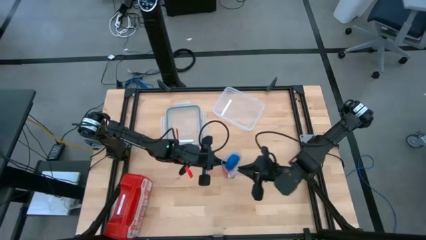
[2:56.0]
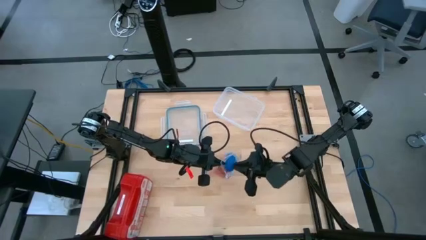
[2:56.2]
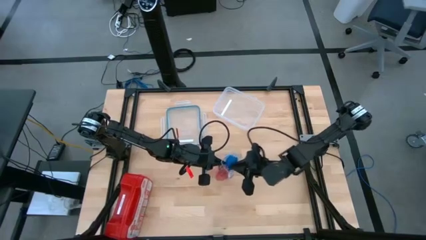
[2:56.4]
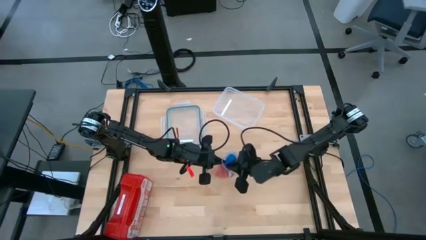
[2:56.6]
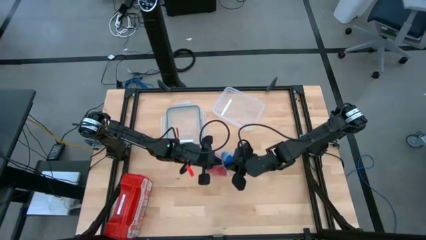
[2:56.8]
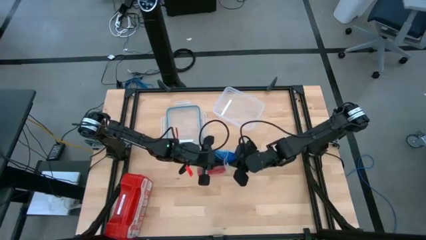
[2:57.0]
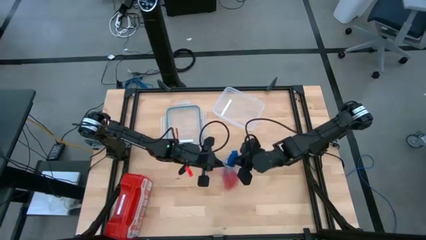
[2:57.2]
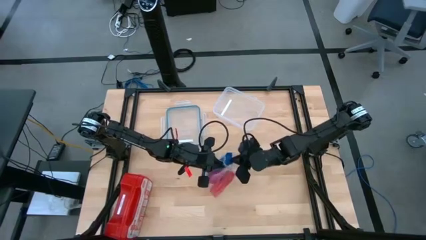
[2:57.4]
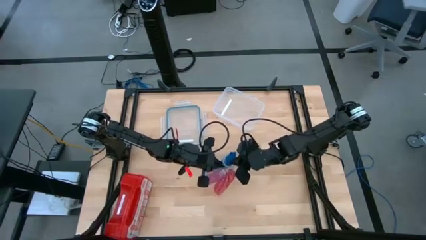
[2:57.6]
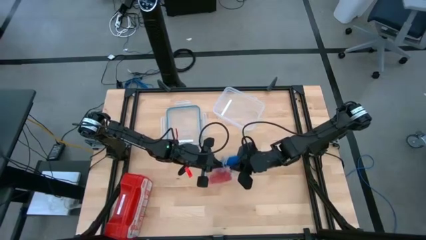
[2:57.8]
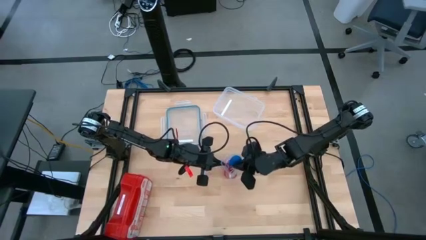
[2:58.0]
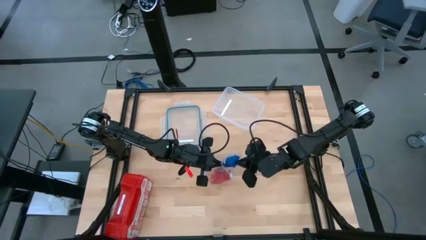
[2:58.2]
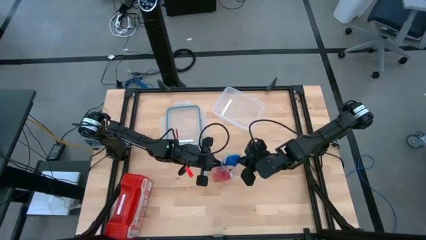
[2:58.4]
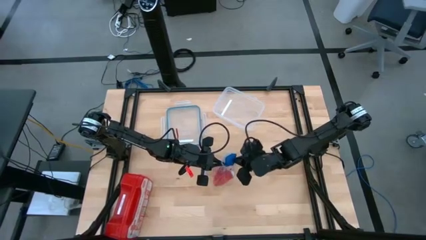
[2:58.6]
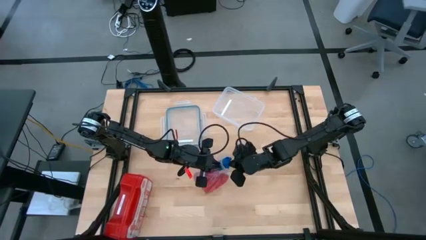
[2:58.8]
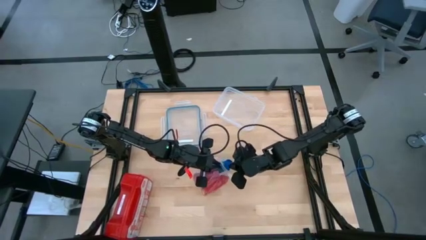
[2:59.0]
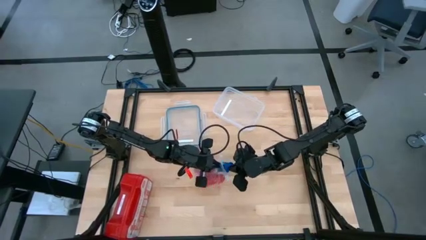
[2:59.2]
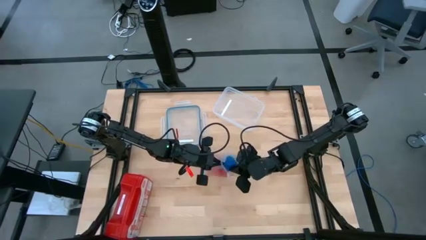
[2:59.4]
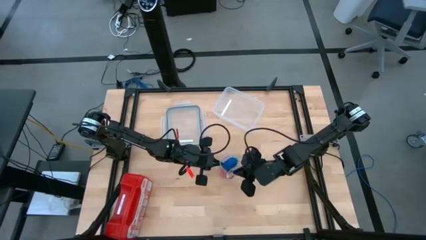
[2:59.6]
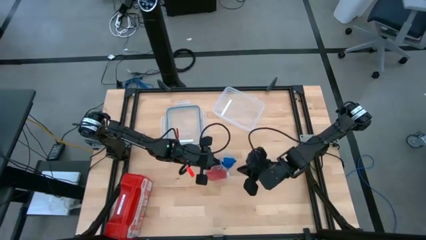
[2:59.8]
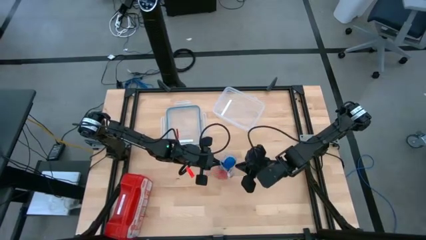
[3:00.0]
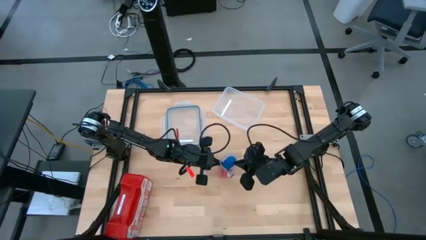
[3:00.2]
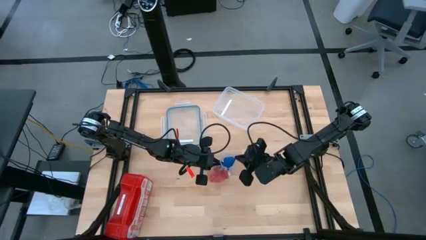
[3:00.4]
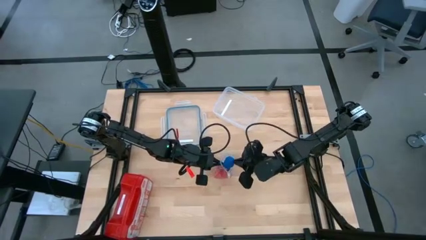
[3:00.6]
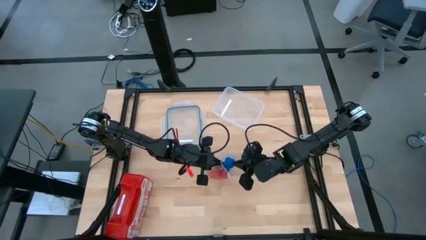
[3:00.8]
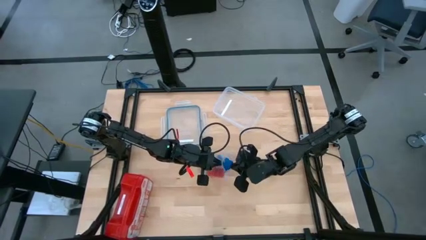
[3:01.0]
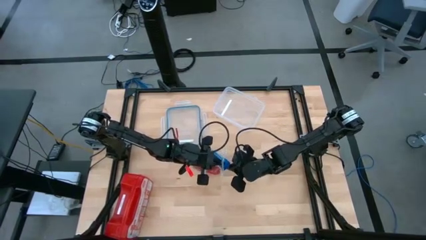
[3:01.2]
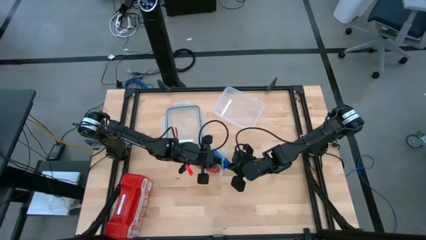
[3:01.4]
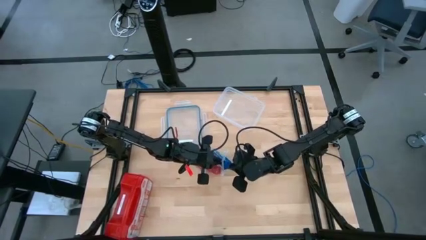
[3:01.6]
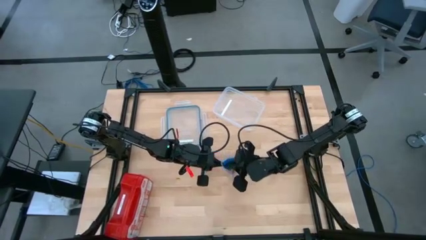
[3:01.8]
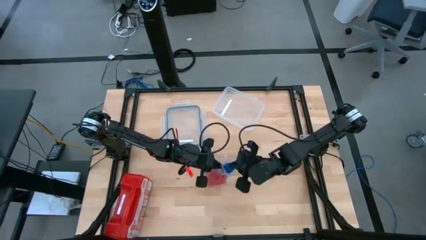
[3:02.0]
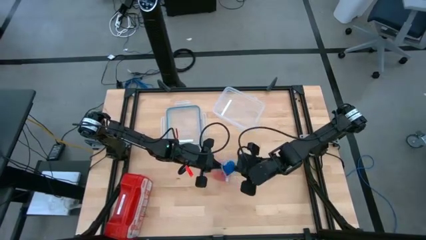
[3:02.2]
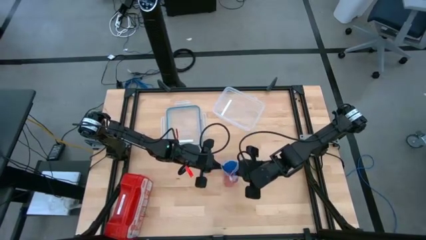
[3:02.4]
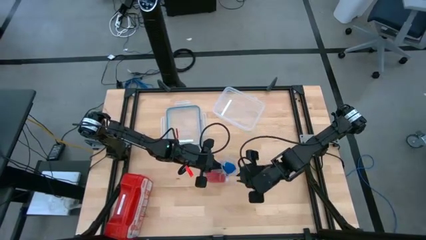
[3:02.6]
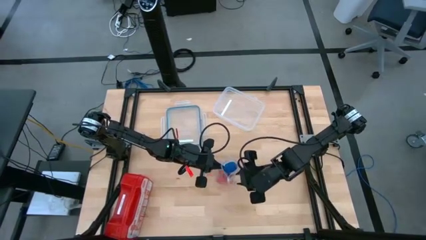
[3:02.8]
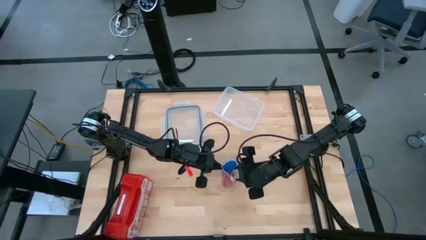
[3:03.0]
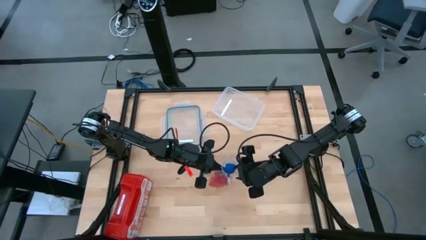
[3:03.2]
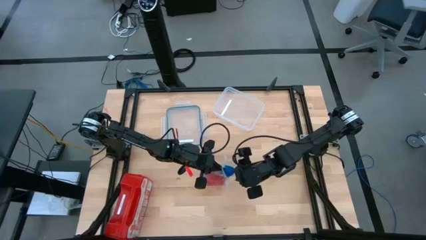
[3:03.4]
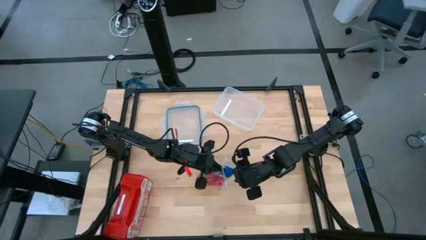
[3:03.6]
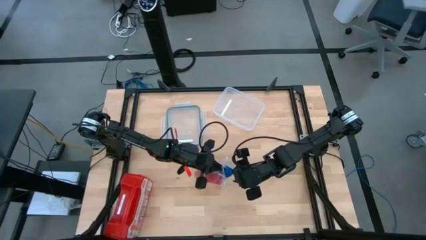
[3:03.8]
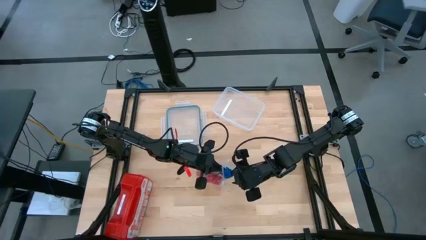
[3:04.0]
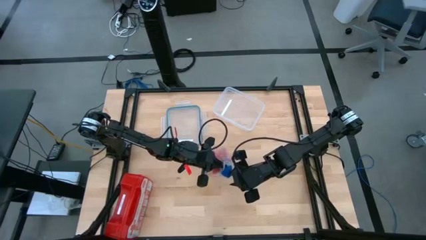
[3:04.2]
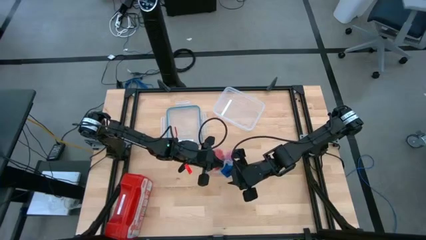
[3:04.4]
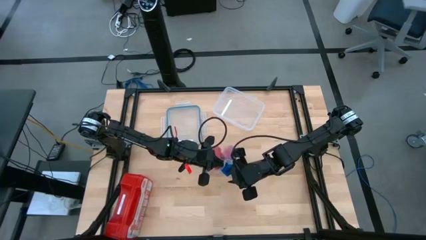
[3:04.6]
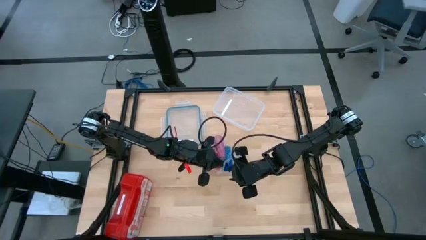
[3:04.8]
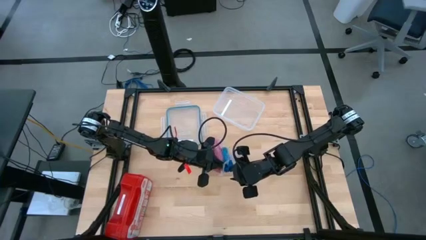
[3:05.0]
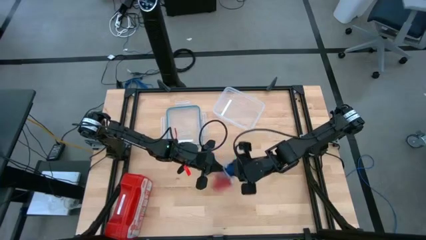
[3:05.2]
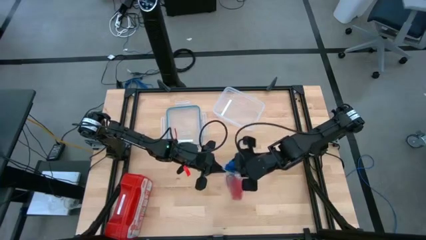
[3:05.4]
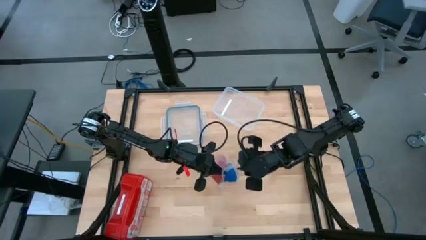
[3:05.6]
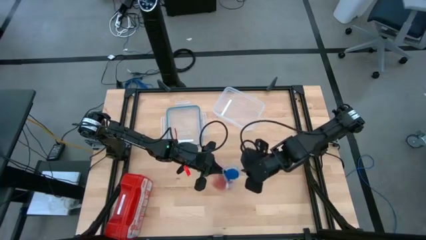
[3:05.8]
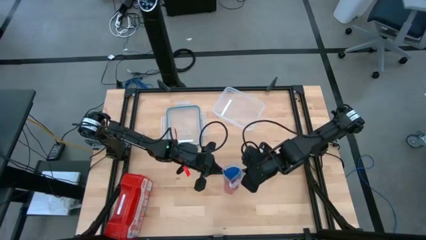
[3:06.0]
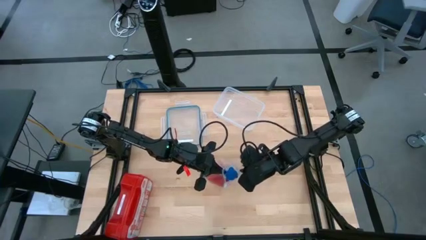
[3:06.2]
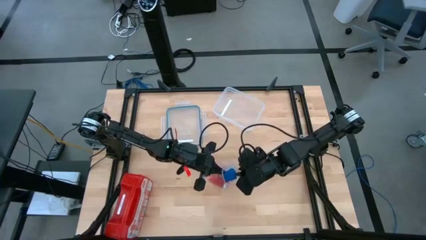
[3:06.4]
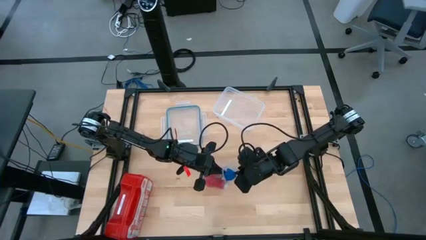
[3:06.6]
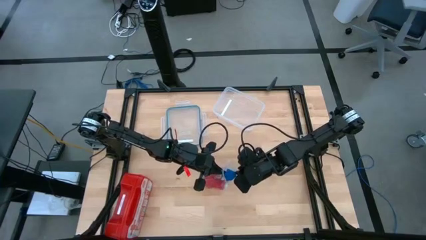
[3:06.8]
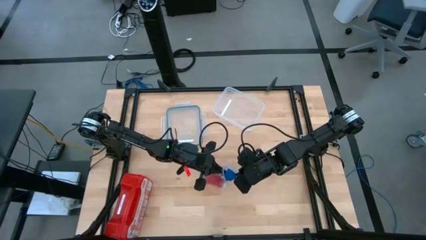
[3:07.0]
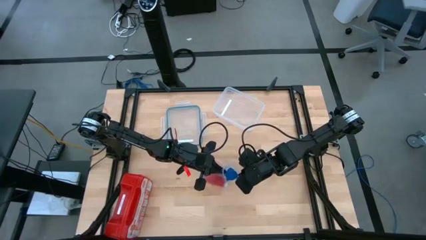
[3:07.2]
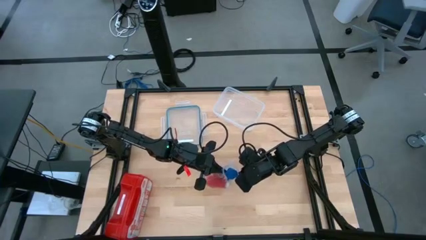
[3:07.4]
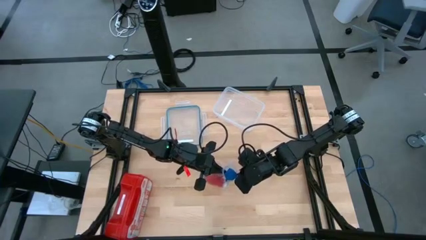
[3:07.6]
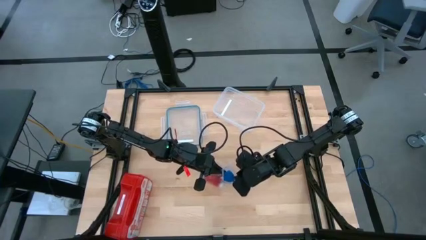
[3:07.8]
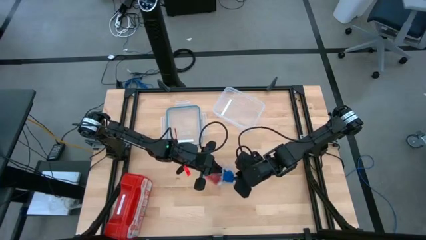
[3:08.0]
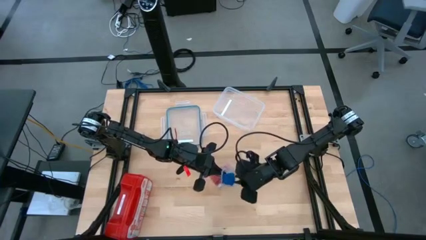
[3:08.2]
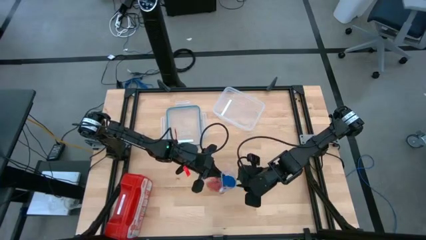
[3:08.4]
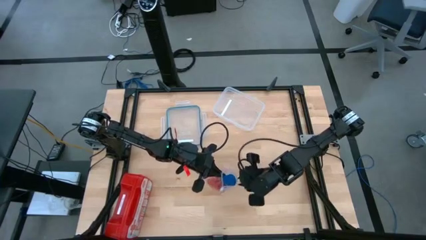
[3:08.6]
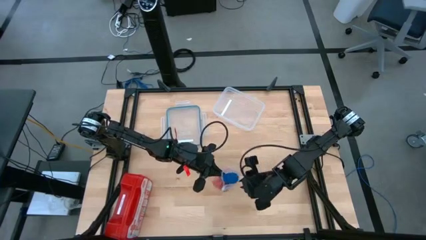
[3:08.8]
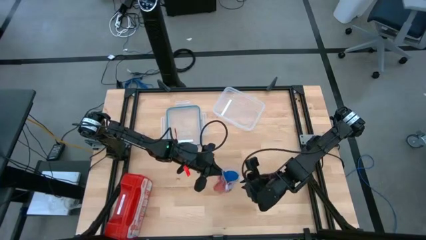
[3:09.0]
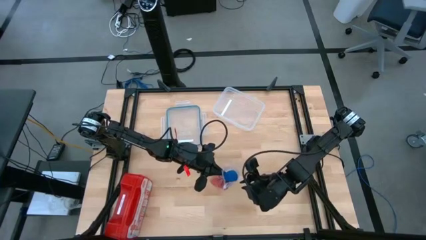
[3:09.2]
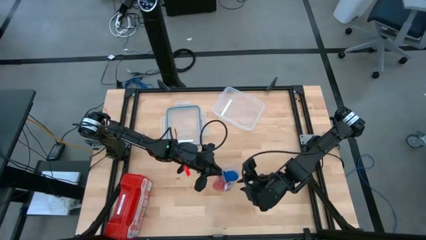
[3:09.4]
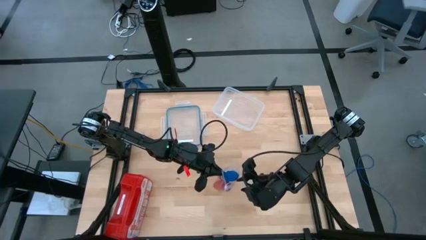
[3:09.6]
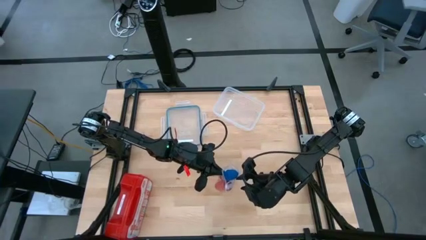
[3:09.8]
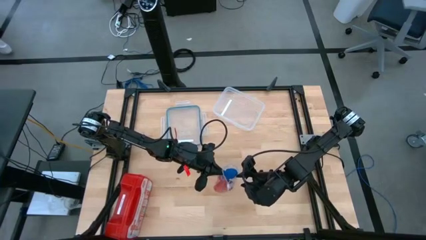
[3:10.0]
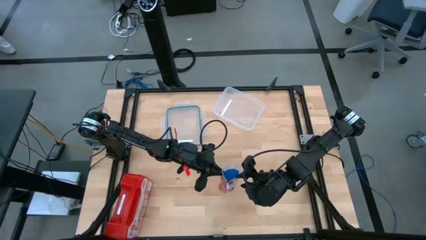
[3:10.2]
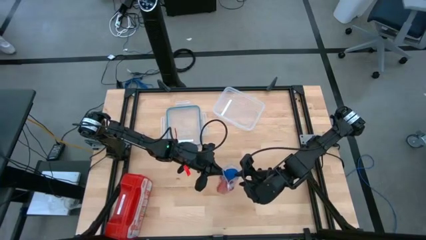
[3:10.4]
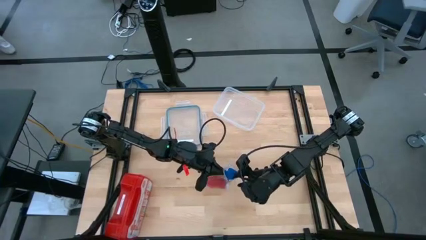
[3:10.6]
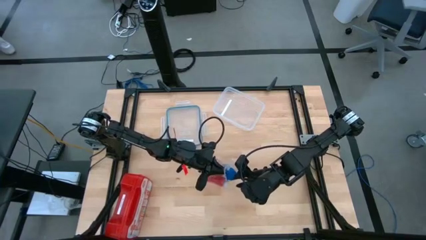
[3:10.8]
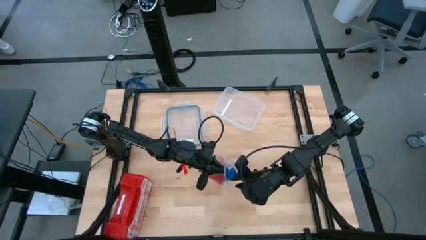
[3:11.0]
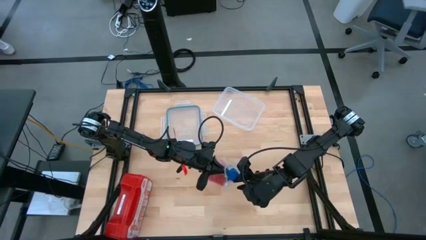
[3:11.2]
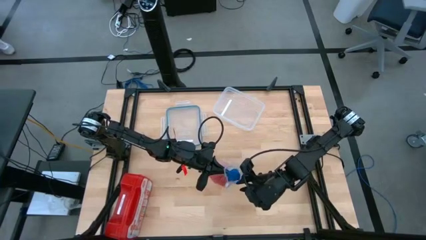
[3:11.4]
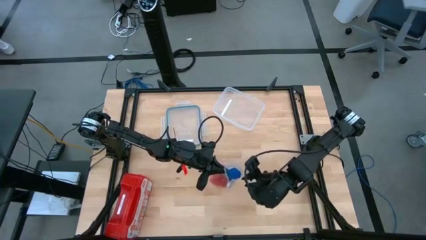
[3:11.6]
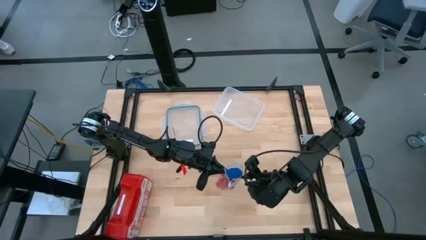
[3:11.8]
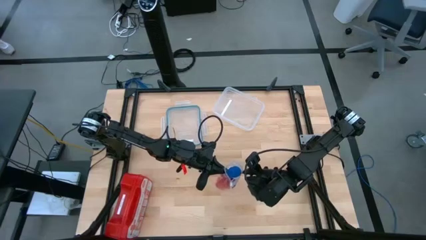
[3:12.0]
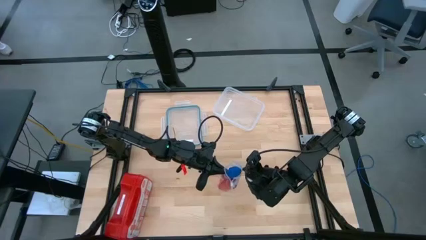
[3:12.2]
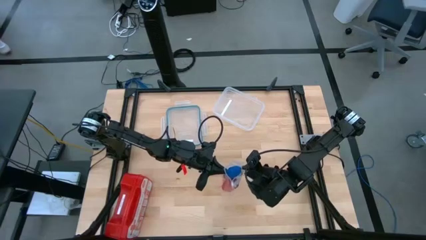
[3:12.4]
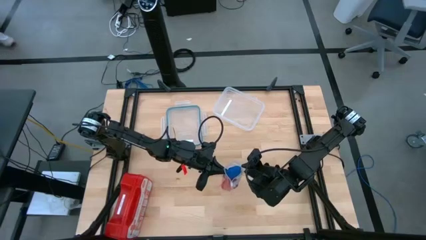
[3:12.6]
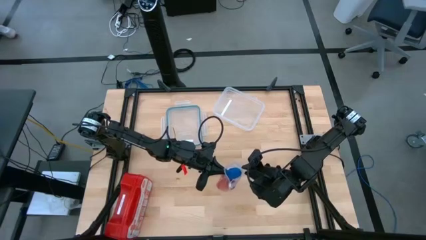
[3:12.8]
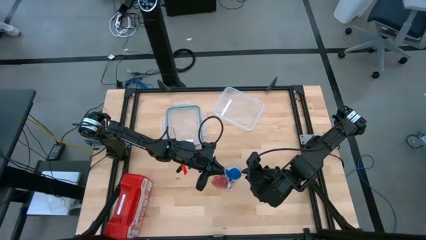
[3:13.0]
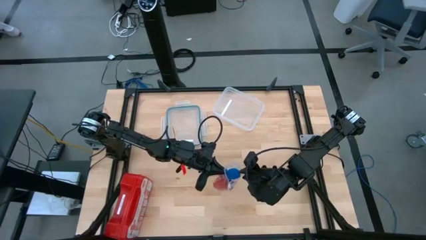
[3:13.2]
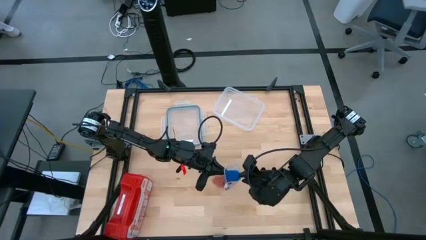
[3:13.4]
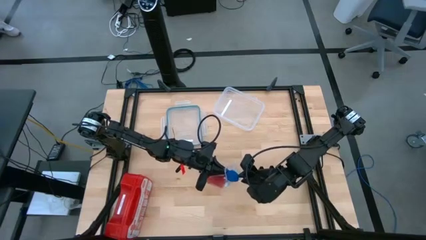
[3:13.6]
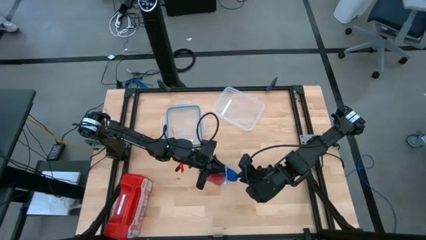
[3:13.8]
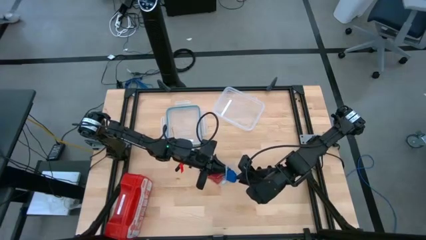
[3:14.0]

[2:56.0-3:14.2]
Task: Roll bandage
Put the blue bandage into the transparent zip bag
